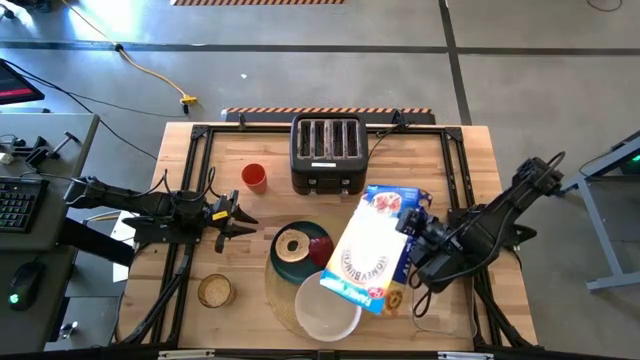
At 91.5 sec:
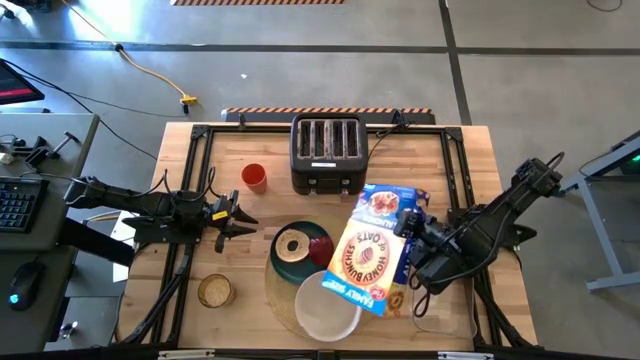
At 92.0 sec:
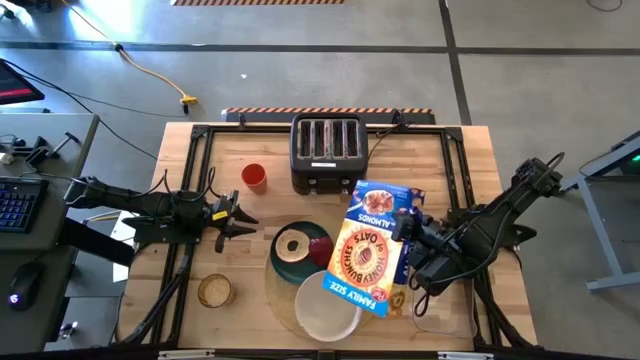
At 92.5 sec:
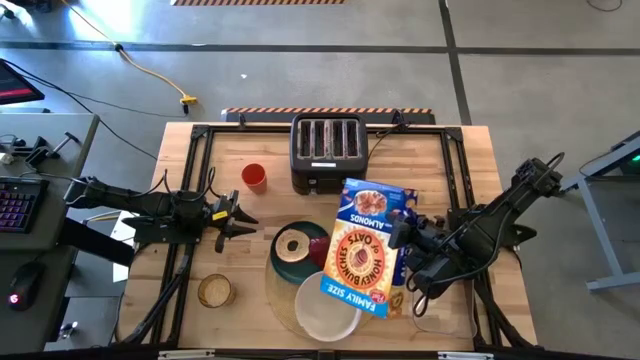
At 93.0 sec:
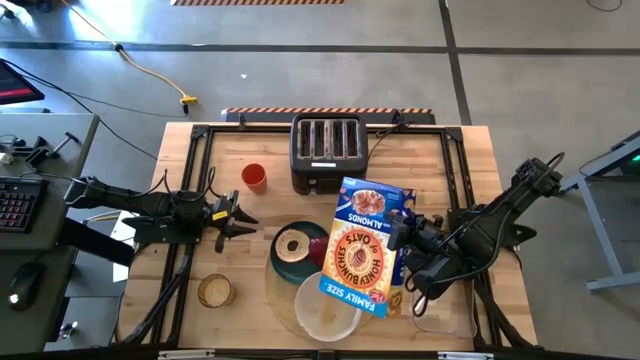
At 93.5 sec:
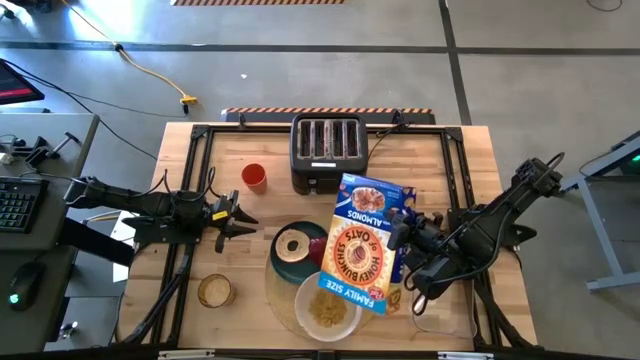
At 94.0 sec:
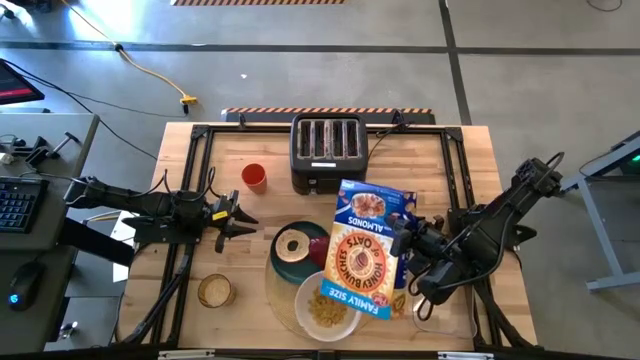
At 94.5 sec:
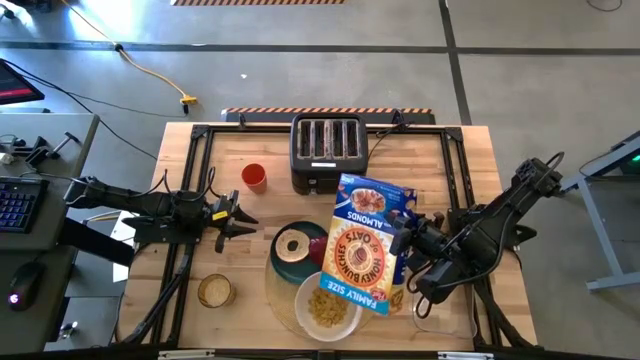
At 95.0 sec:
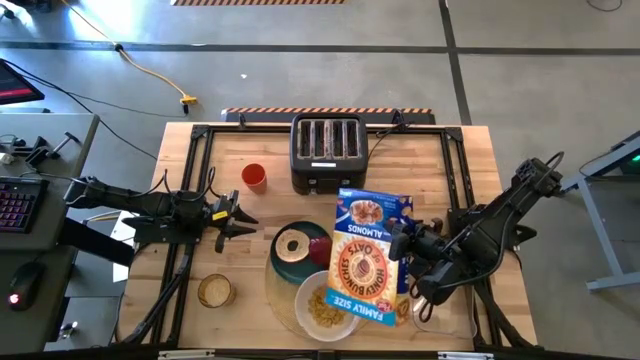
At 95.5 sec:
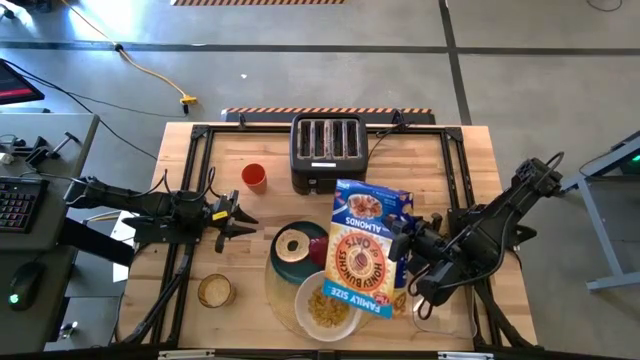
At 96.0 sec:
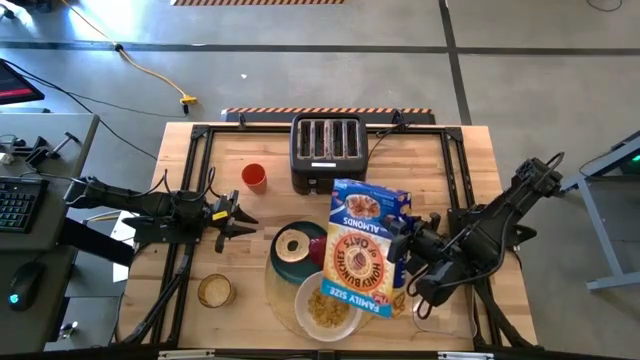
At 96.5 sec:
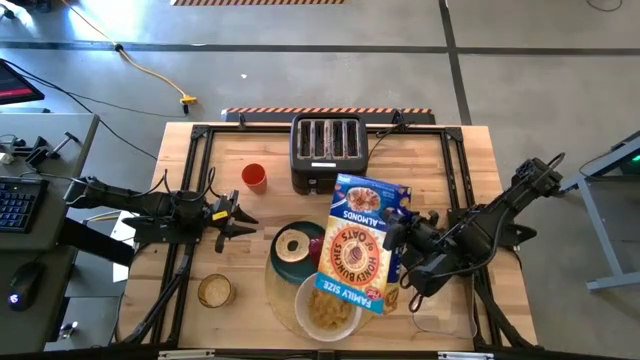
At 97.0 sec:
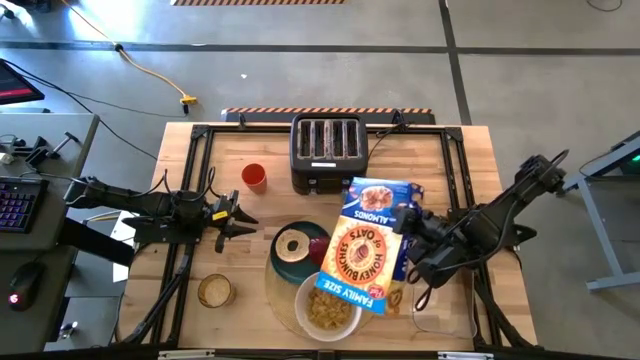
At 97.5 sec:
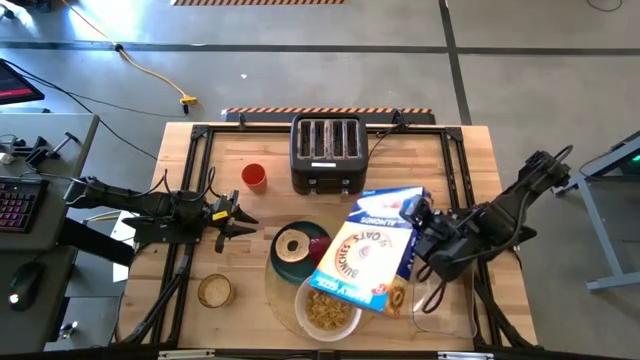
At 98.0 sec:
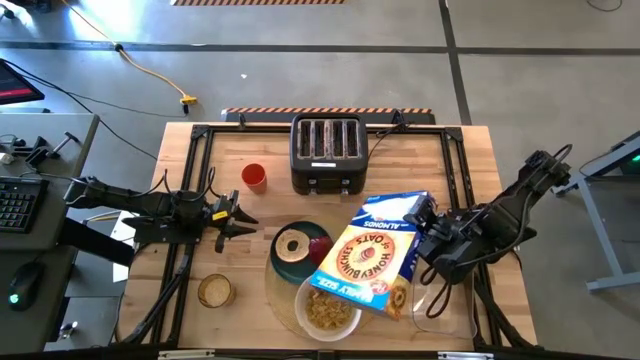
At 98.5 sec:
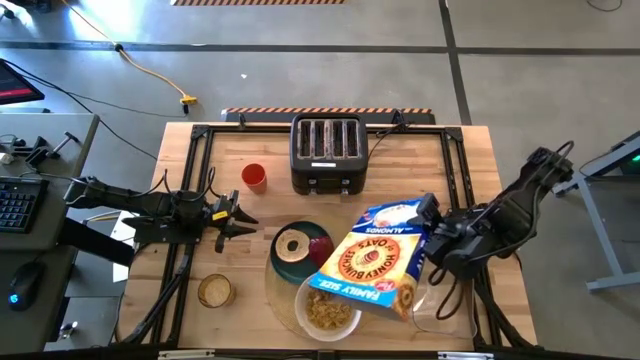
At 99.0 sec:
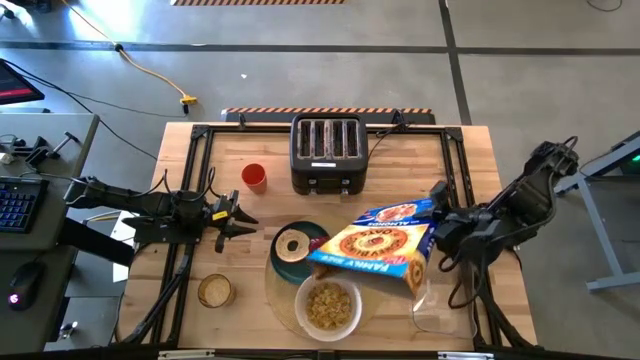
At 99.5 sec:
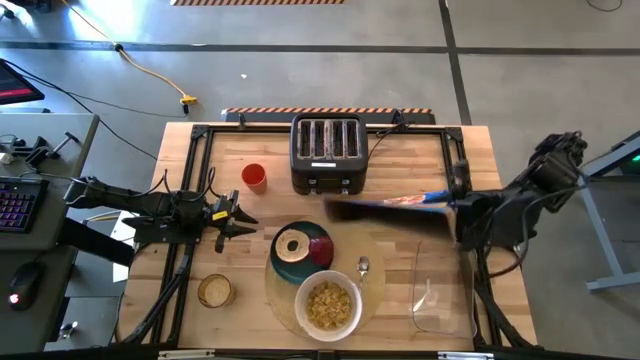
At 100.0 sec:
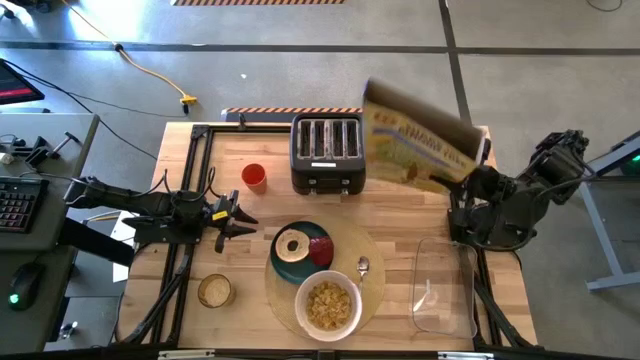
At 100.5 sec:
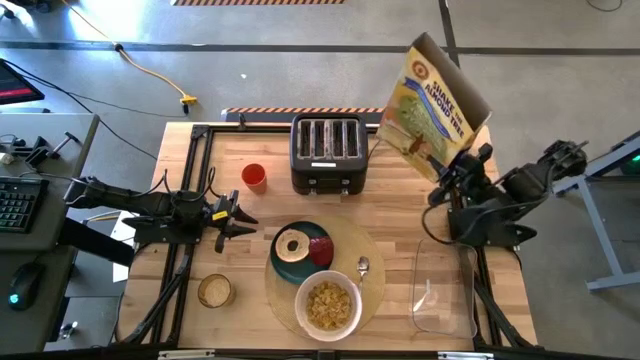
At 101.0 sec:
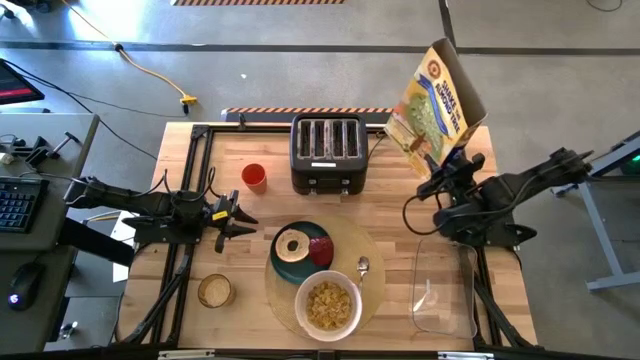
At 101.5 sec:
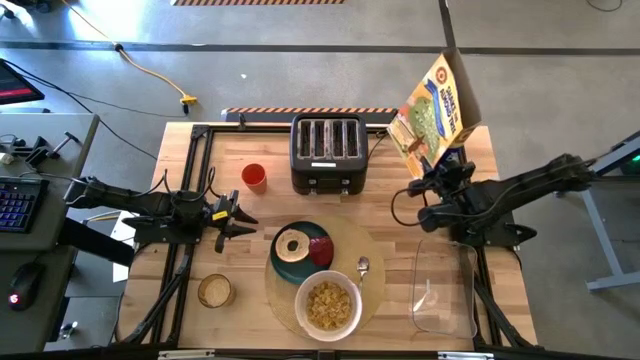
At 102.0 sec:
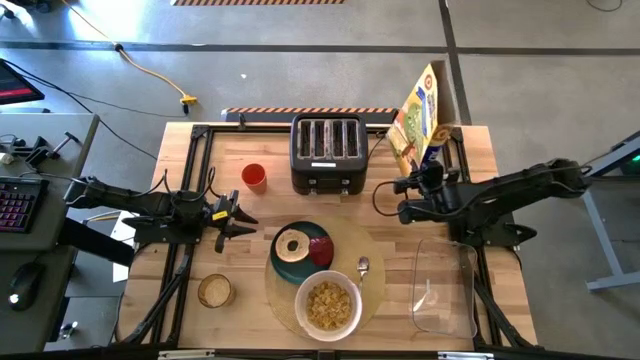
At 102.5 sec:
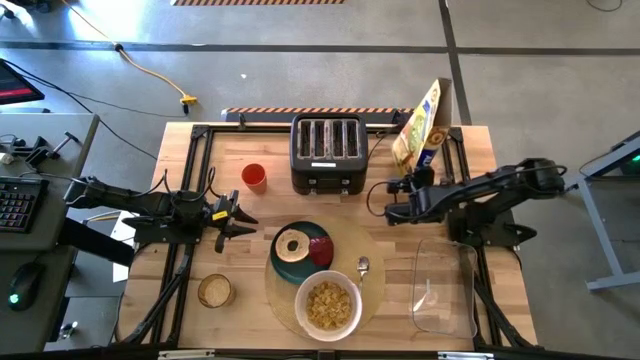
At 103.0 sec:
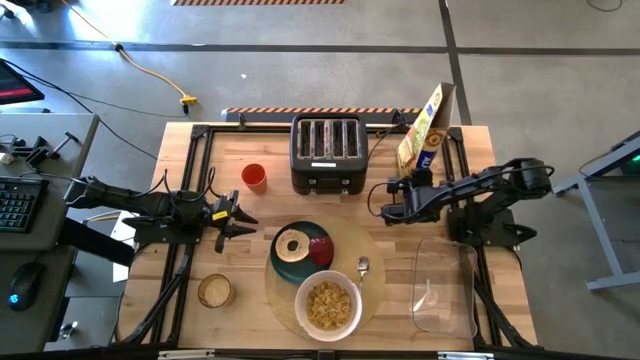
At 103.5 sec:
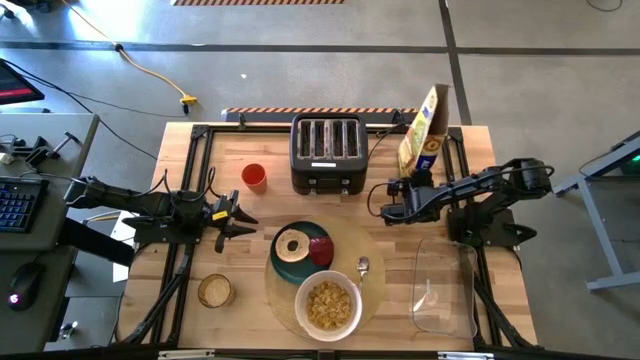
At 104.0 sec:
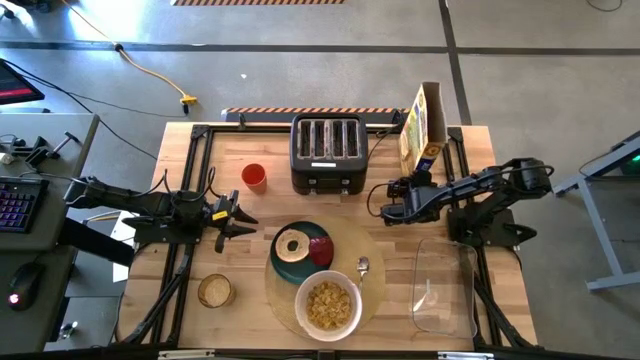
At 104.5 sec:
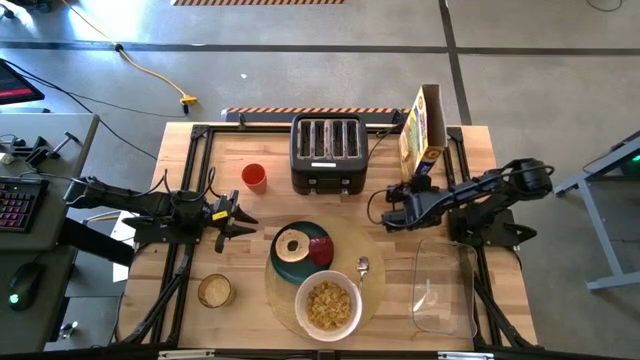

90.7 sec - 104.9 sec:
Task: Arrange a breakfast setting
Pour the cereal into the white bowl

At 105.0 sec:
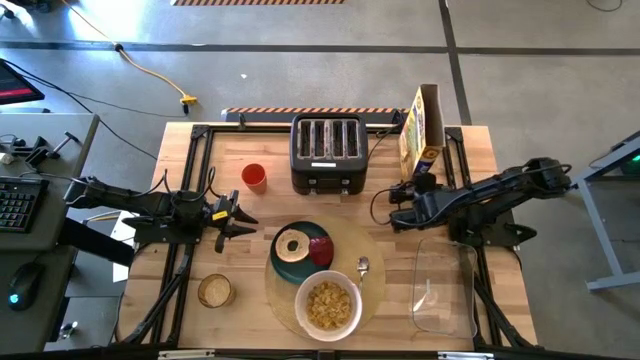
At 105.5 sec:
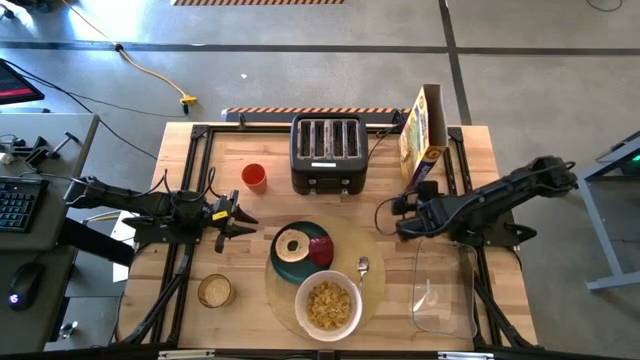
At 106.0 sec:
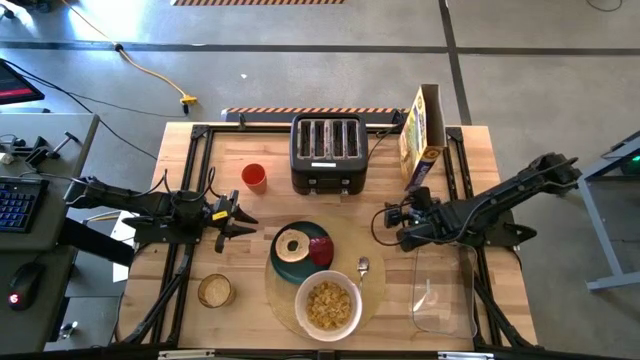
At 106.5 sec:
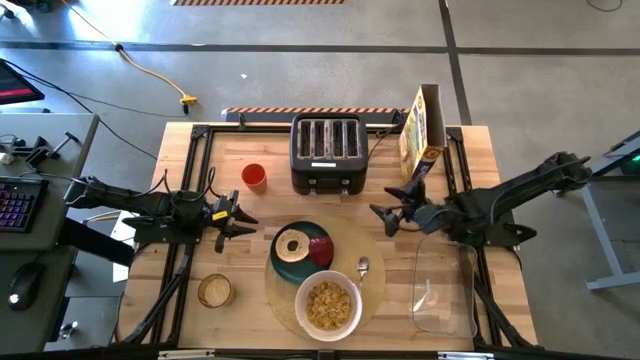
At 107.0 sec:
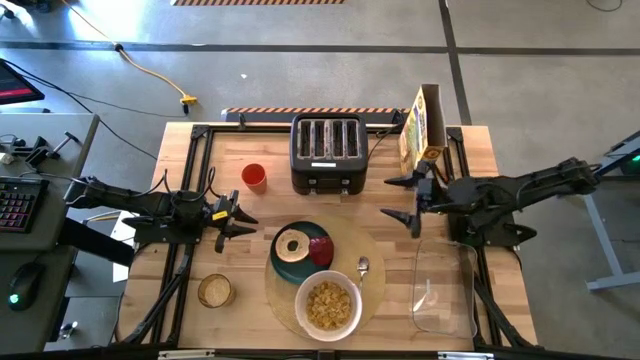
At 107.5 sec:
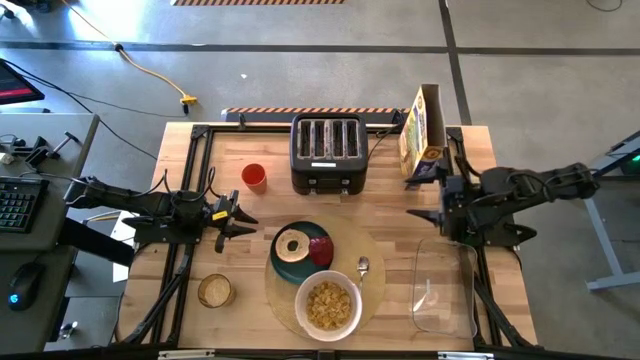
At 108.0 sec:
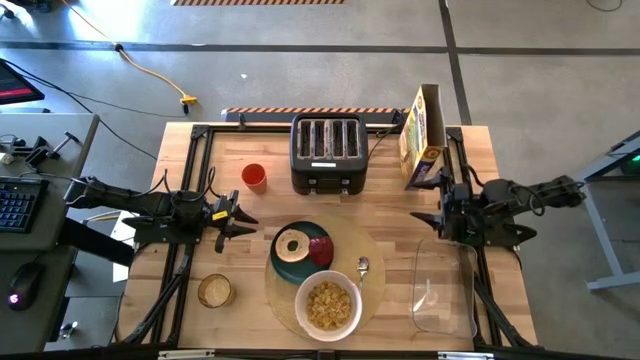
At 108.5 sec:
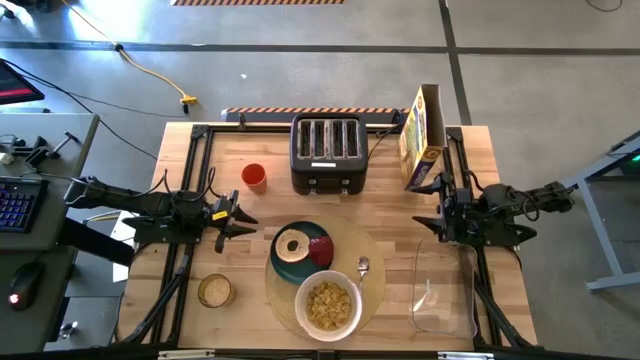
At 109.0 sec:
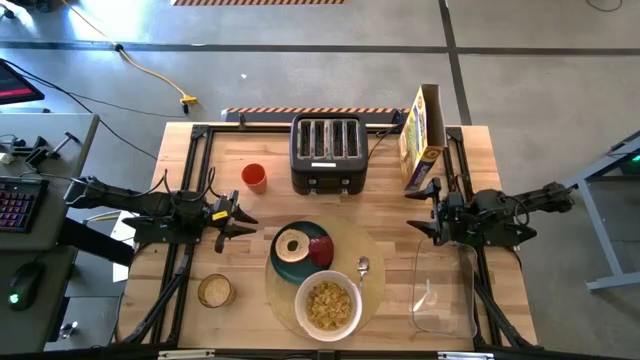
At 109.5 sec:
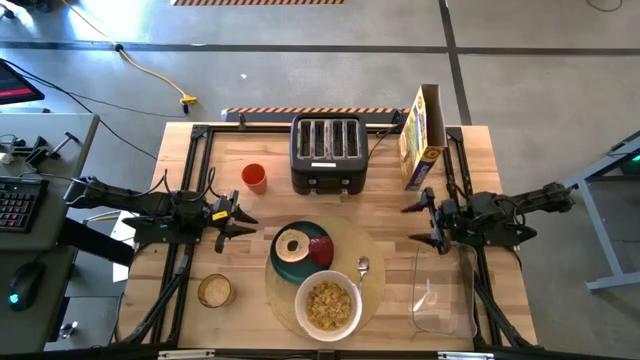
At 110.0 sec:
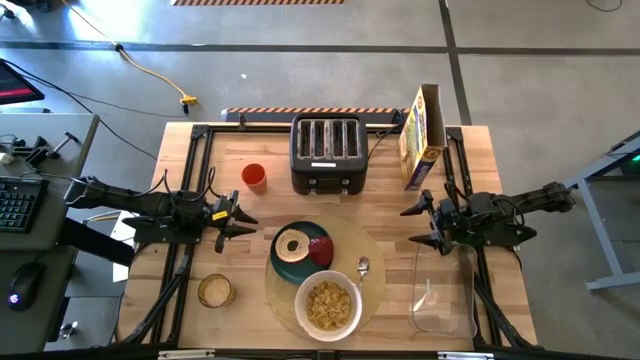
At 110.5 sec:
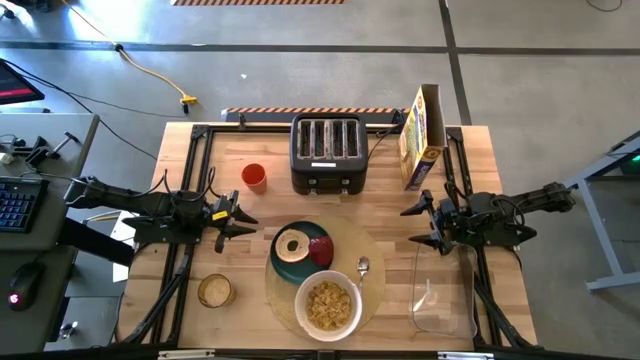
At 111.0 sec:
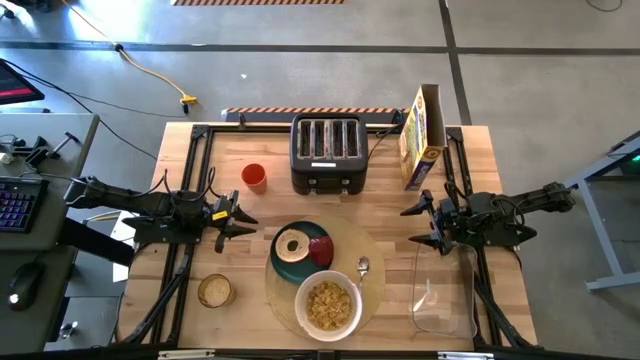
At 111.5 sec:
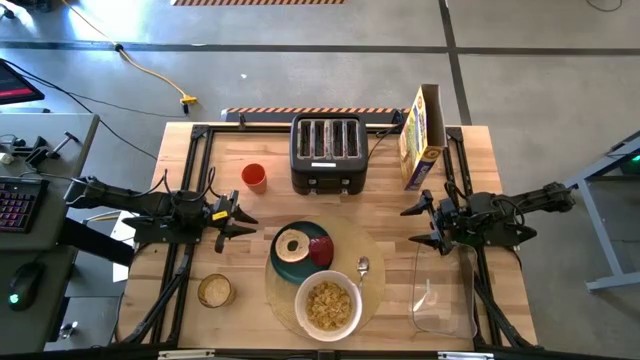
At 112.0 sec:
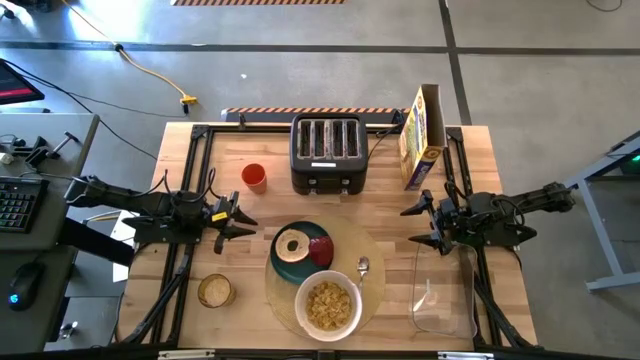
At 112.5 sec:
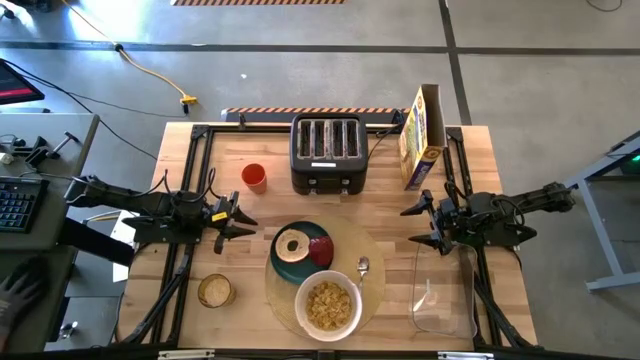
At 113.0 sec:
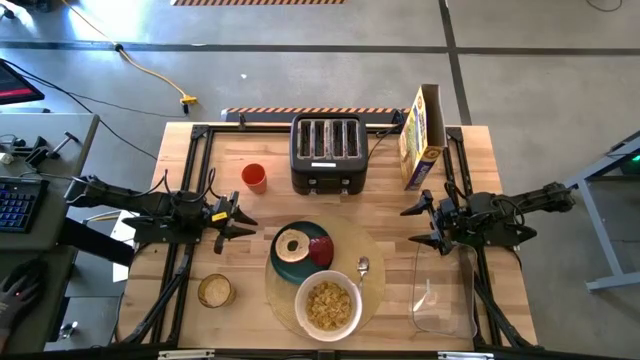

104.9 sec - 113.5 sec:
Return to Home Position
